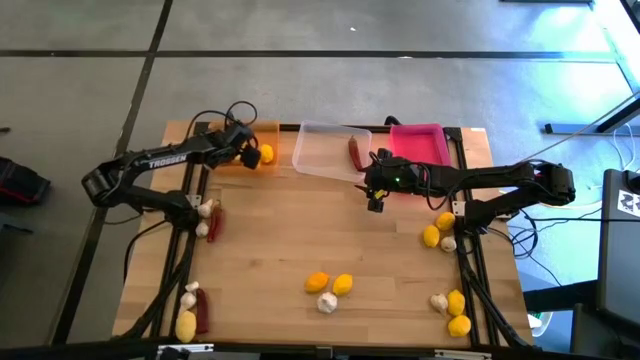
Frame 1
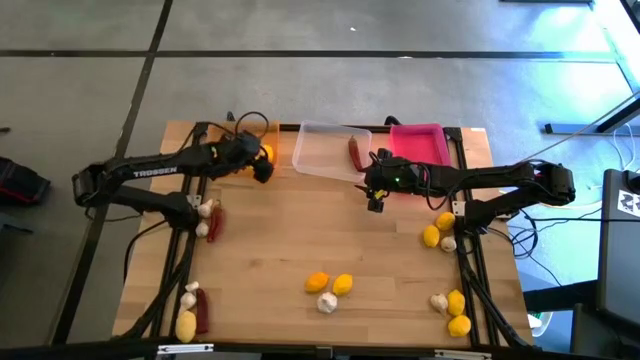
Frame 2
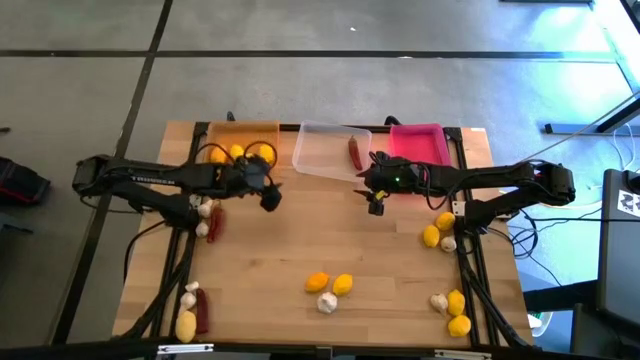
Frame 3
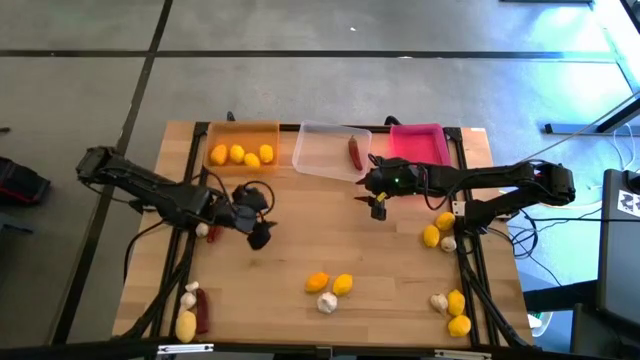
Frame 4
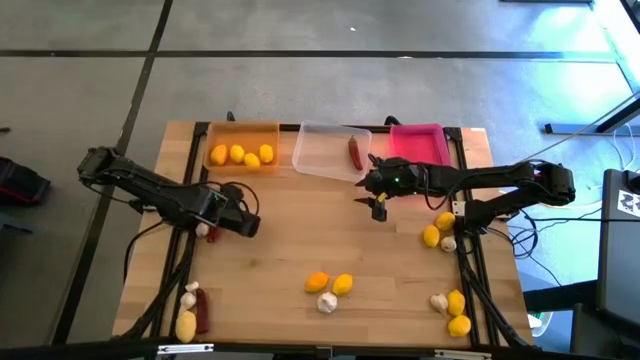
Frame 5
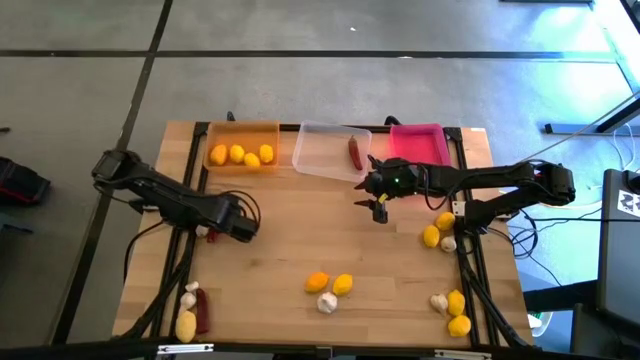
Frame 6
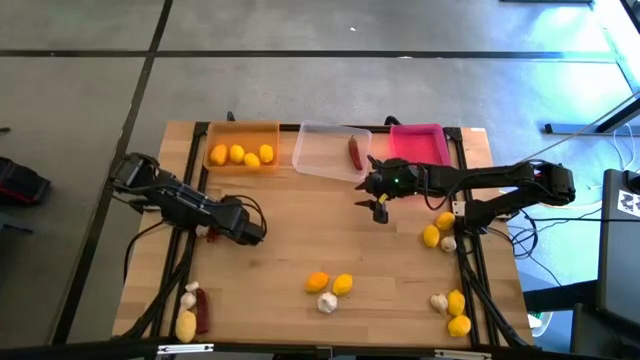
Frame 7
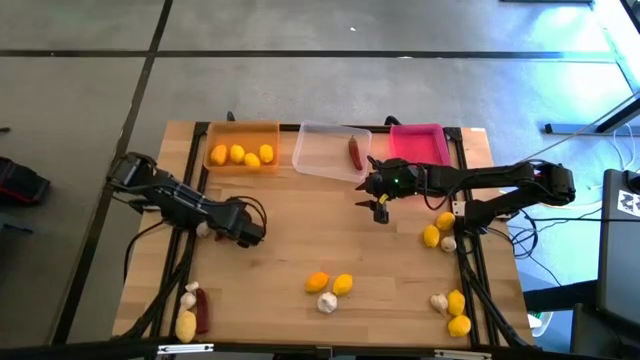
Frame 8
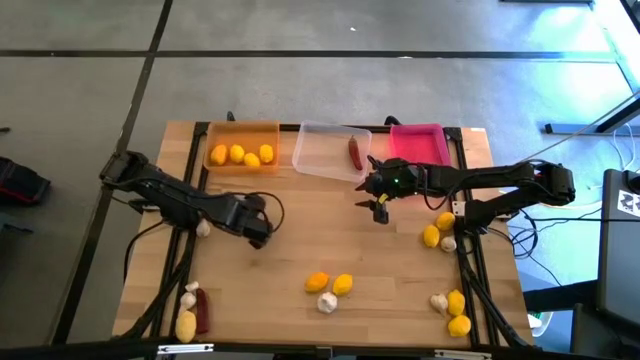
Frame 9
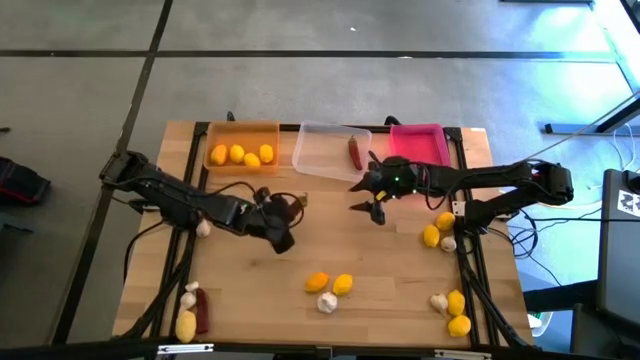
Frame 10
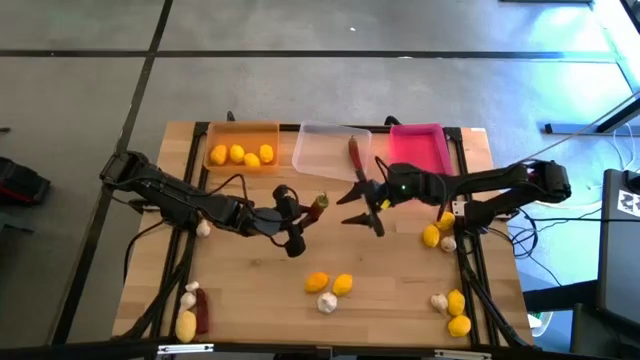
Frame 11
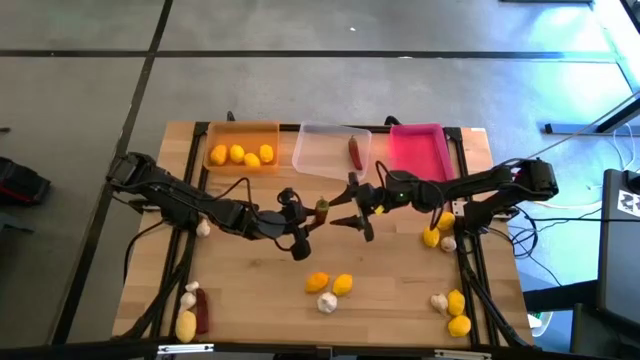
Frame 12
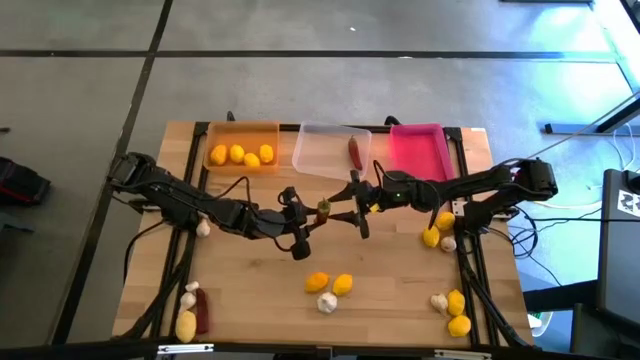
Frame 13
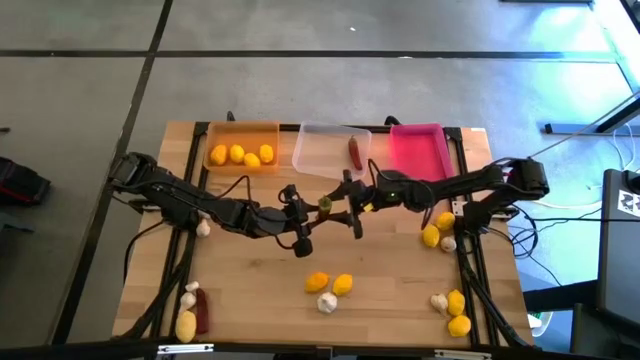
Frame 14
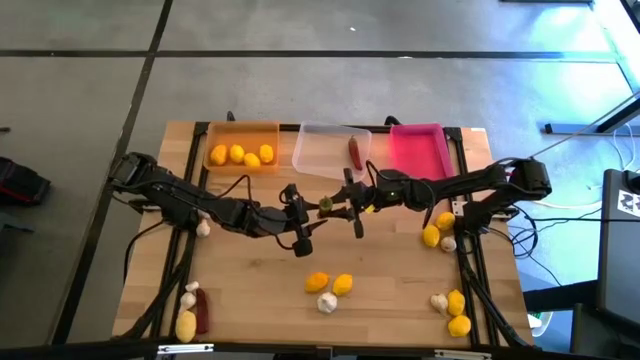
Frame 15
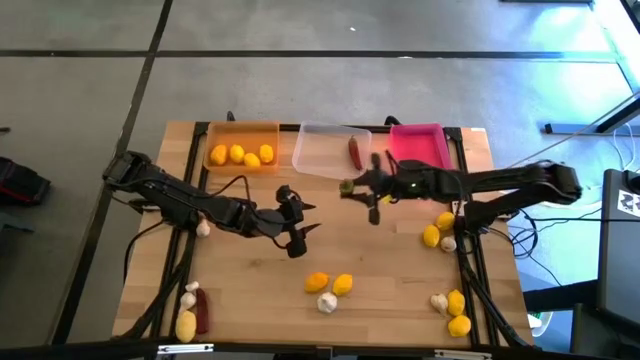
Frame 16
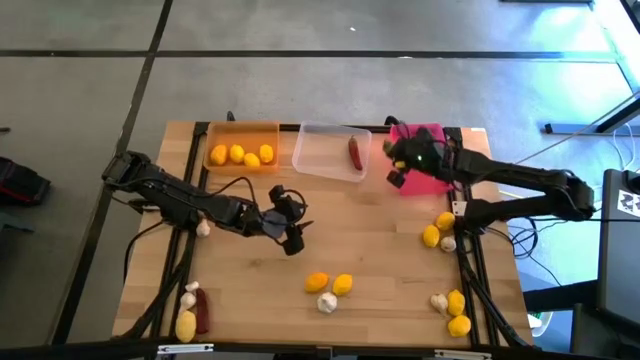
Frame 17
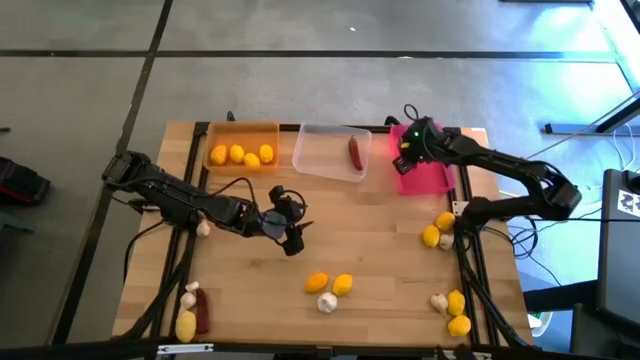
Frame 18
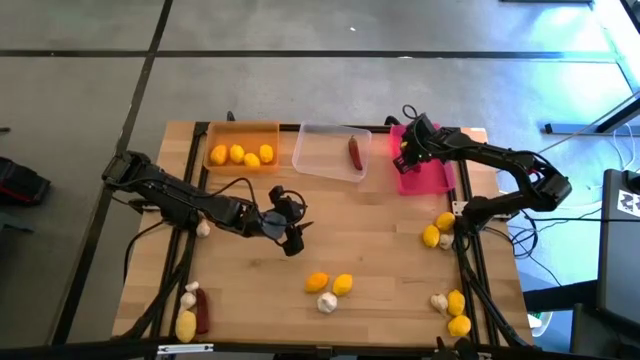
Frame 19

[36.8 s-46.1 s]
Task: Sort produce into baskets
Put the red chili pepper into the red bin

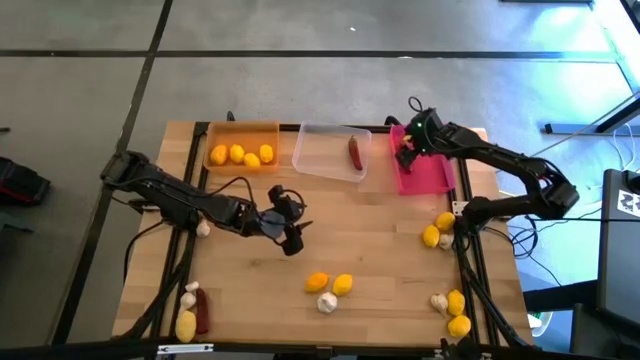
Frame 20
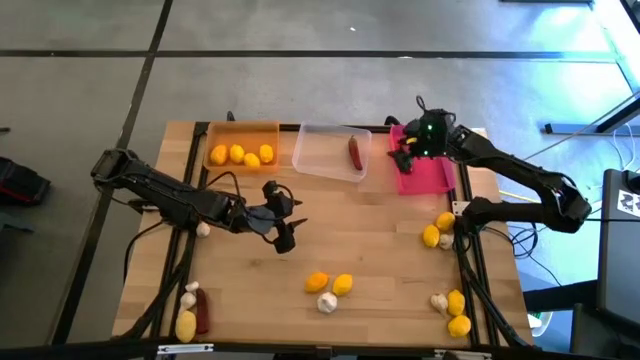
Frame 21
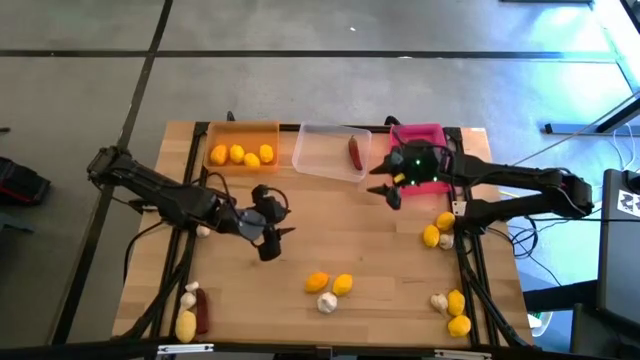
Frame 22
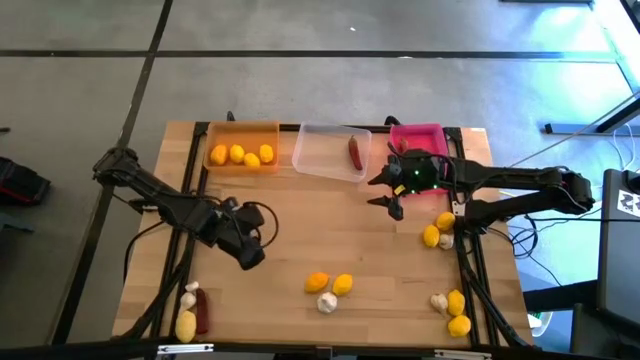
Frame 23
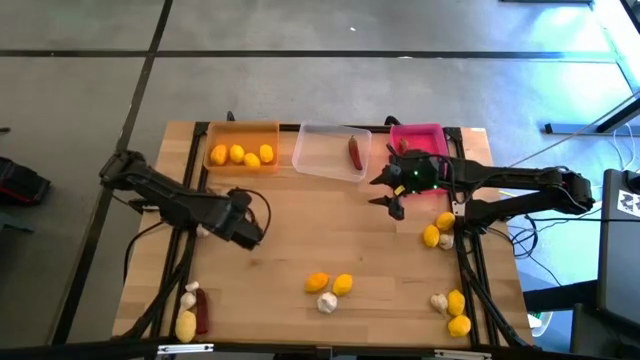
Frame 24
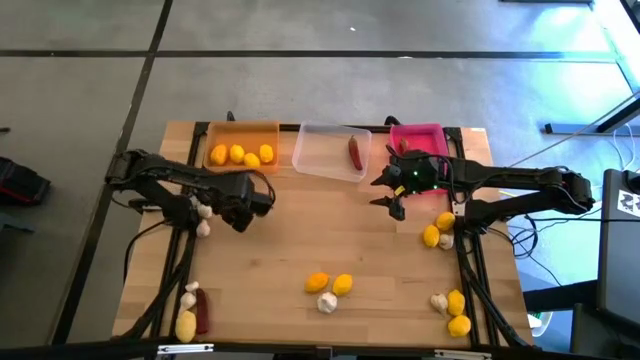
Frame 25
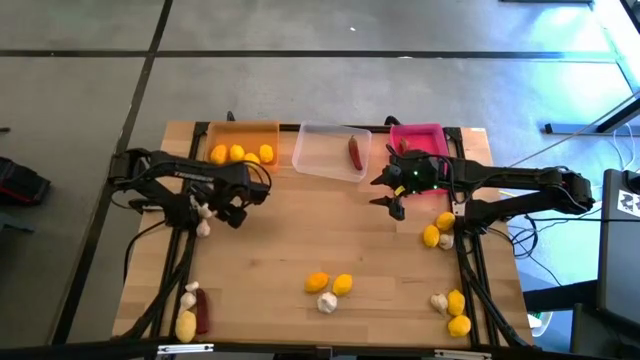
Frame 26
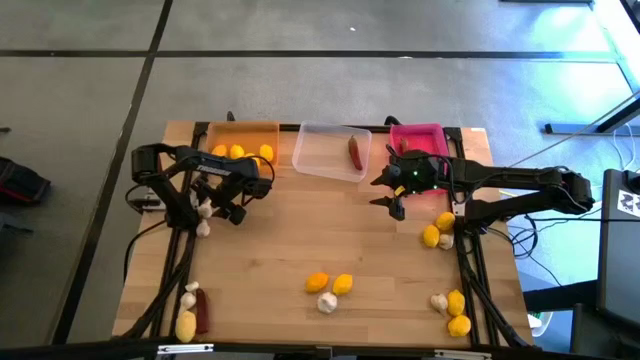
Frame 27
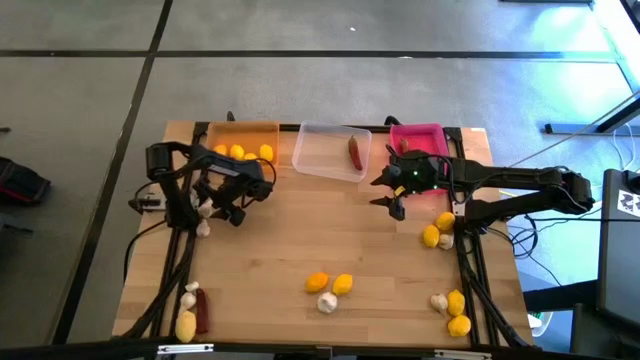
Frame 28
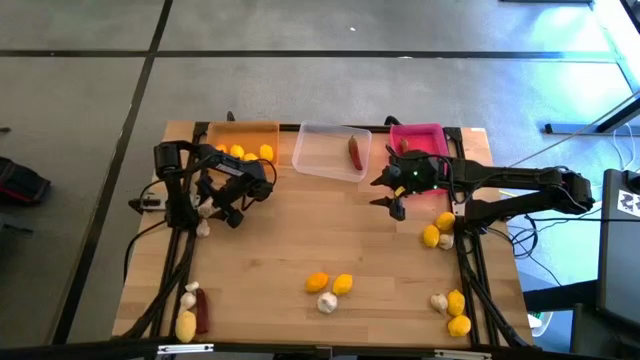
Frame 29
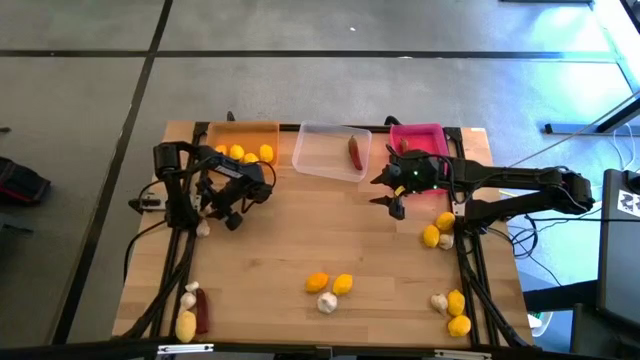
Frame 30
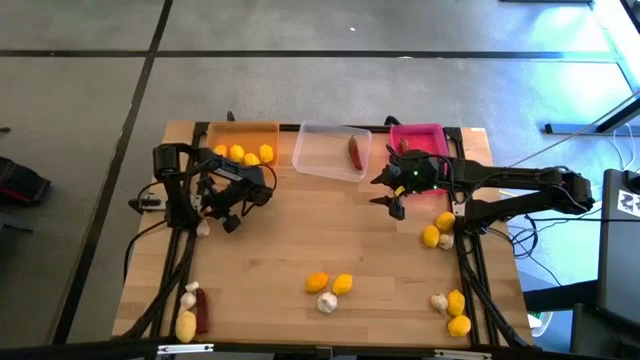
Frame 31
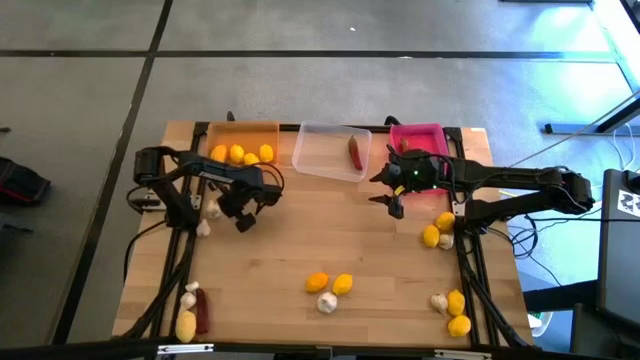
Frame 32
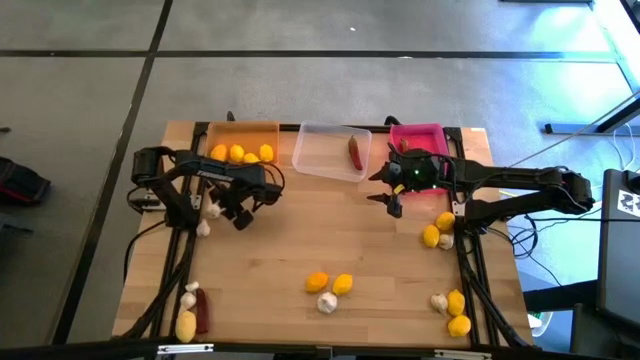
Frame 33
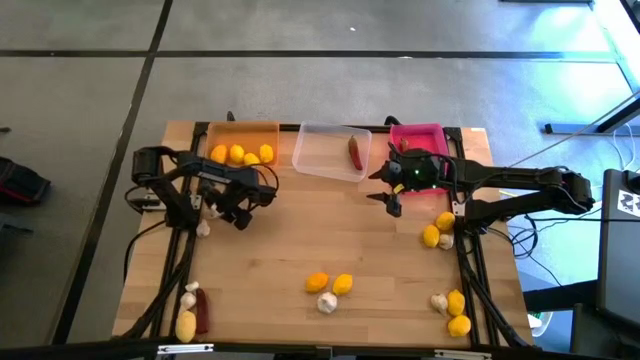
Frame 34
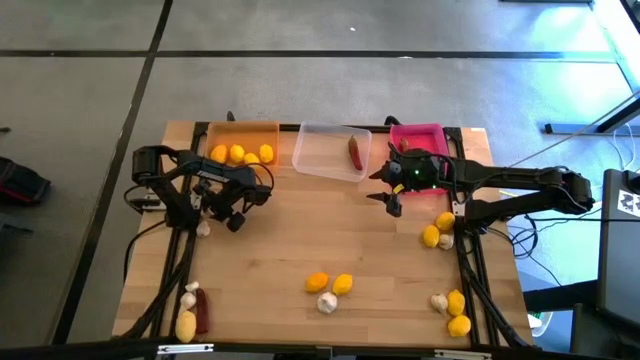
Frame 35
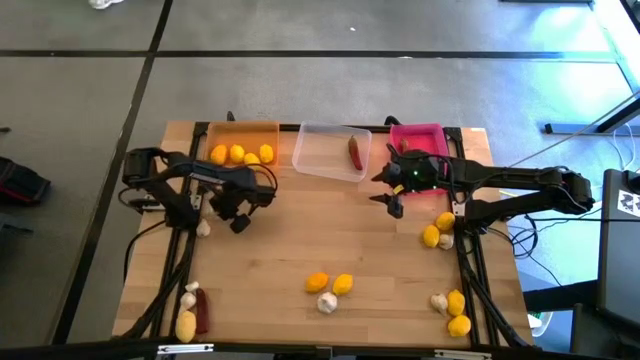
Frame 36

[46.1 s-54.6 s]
Put the white garlic into the transparent bin

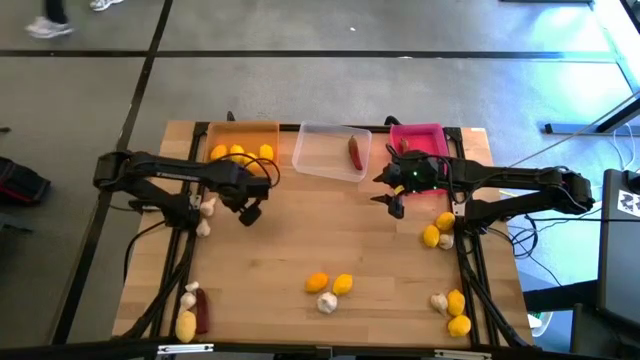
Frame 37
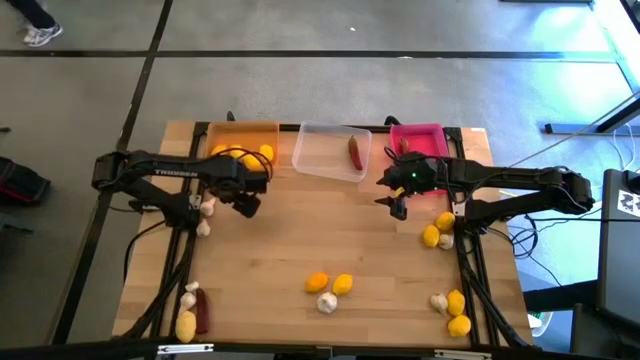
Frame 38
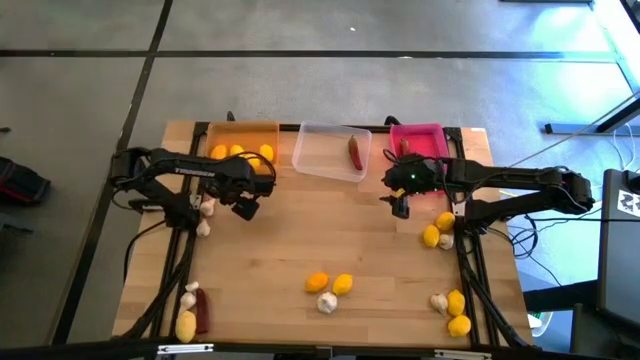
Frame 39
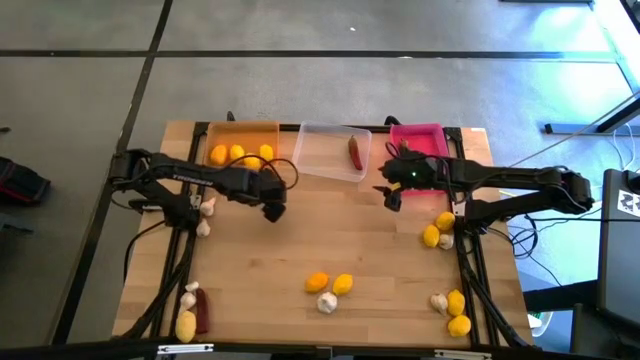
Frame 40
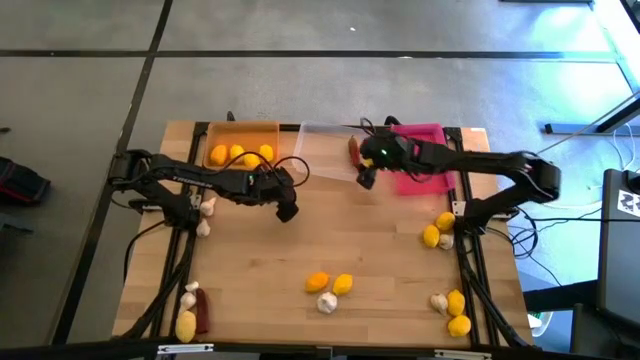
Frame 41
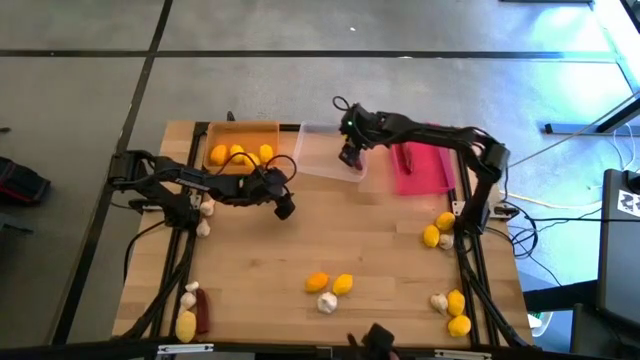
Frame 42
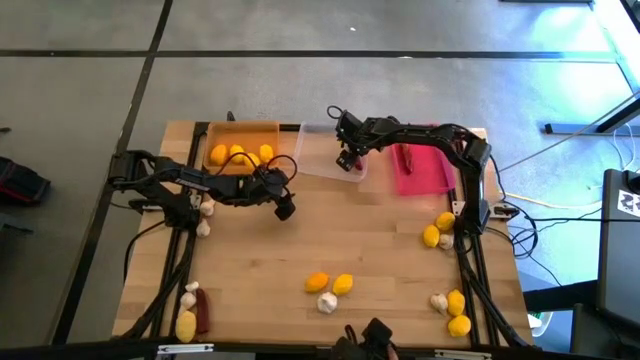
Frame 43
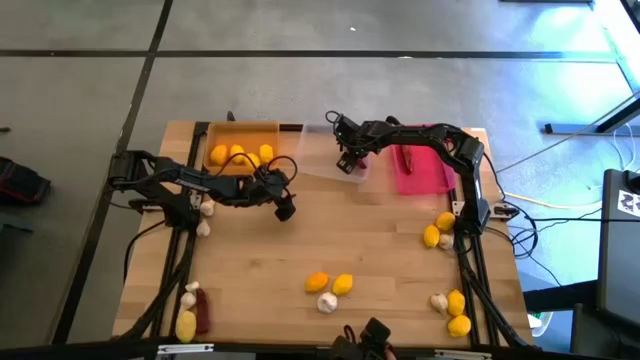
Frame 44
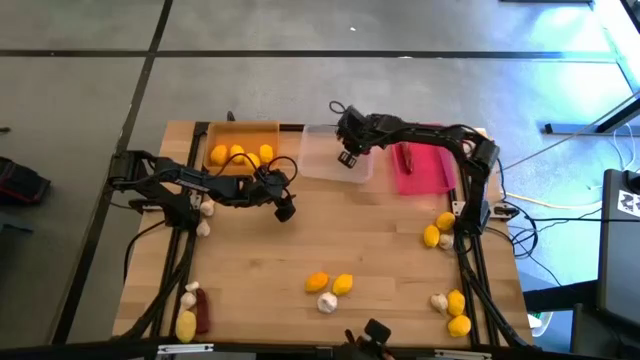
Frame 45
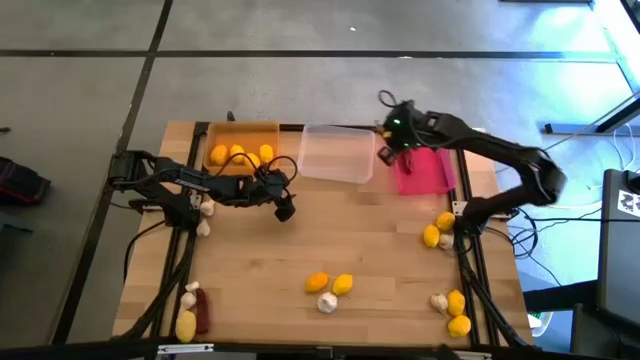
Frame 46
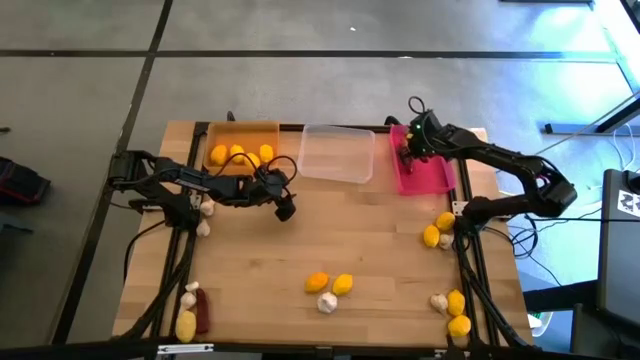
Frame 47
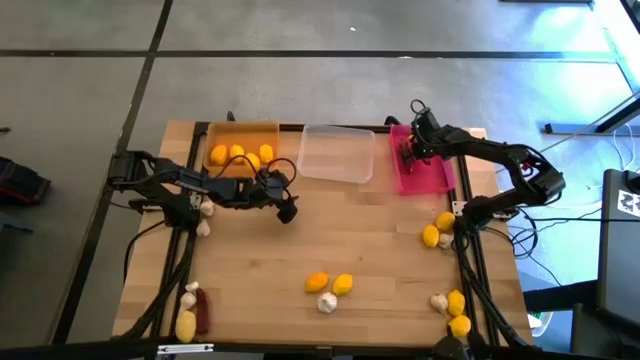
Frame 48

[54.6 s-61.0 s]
Put the red chili pepper into the red bin
